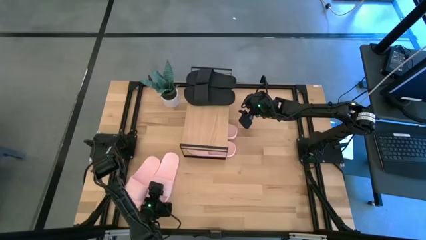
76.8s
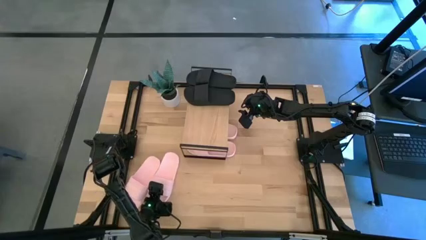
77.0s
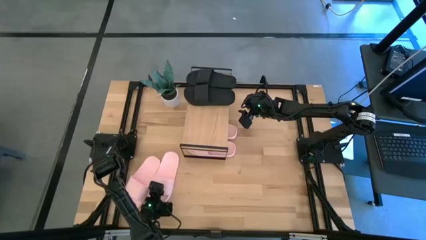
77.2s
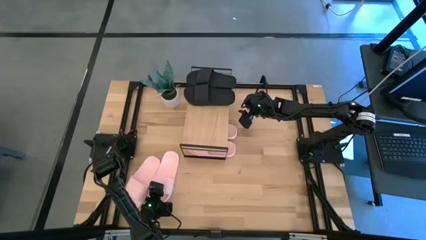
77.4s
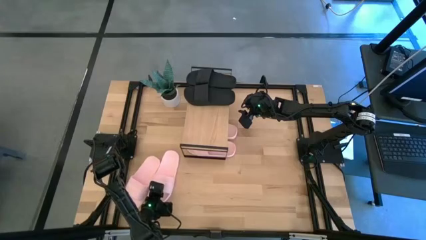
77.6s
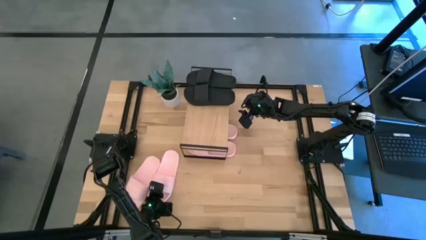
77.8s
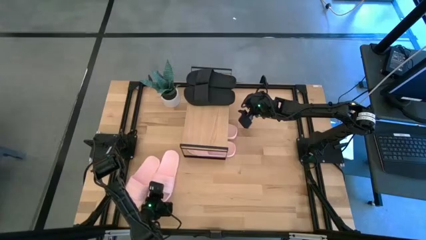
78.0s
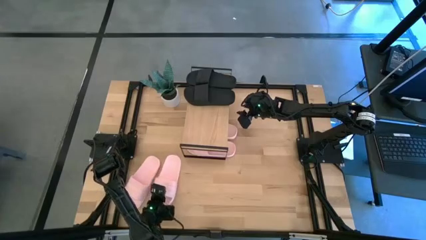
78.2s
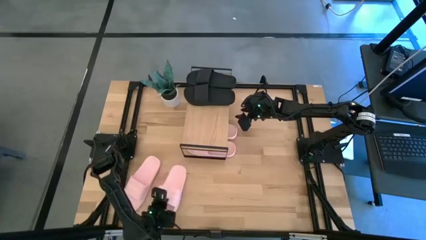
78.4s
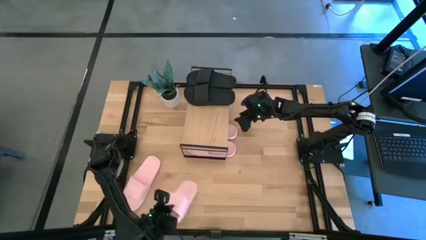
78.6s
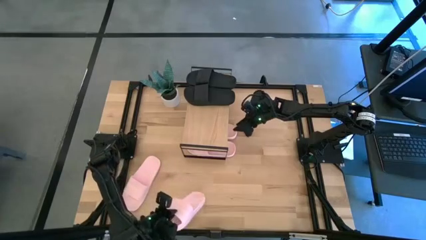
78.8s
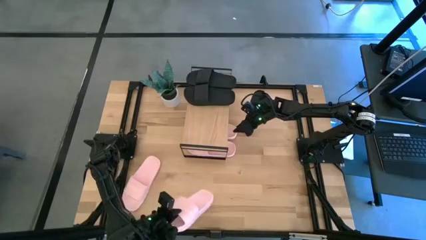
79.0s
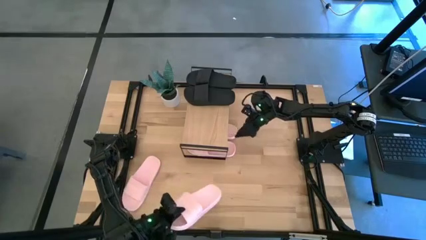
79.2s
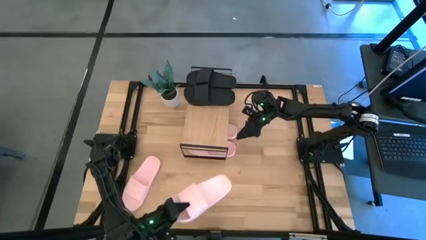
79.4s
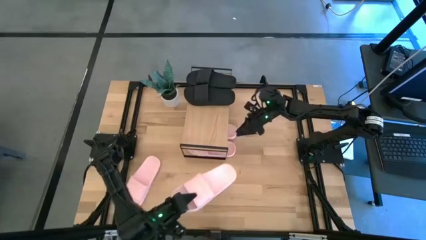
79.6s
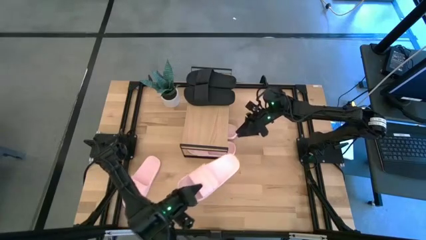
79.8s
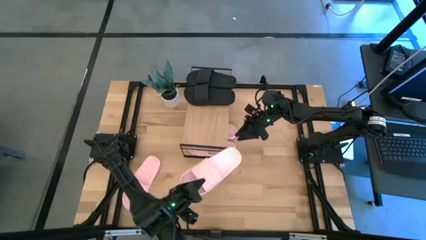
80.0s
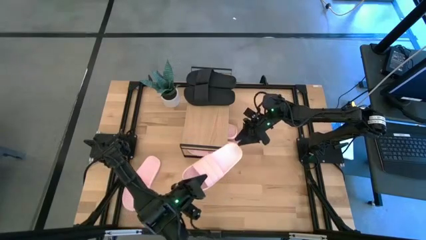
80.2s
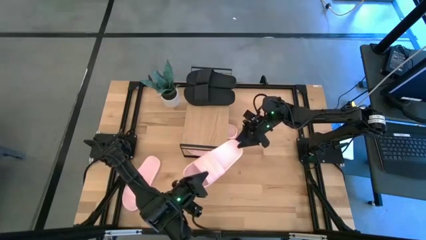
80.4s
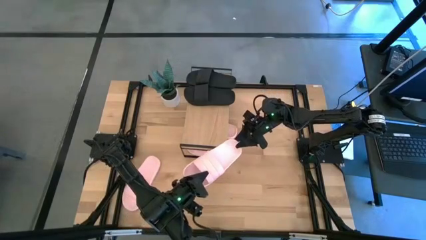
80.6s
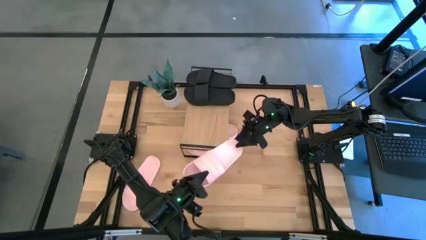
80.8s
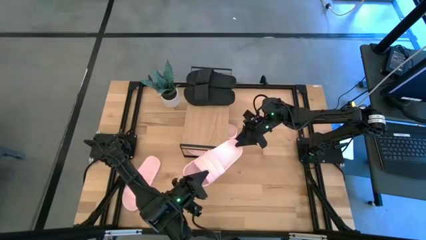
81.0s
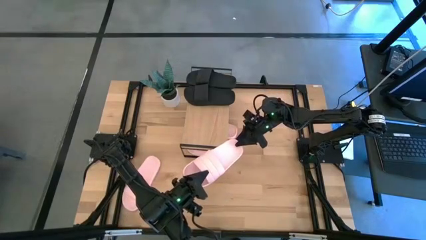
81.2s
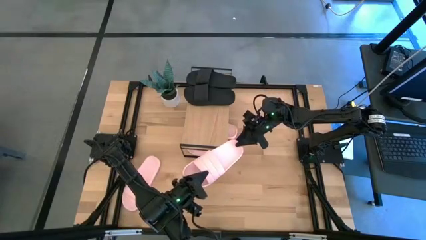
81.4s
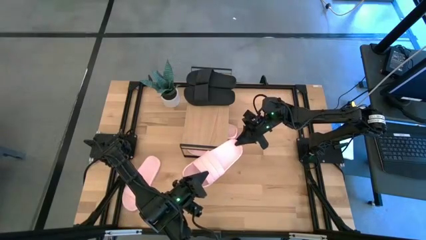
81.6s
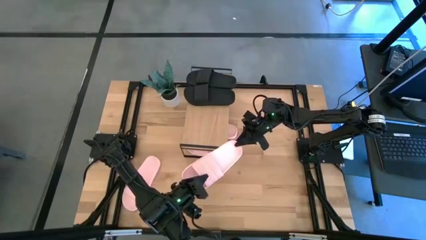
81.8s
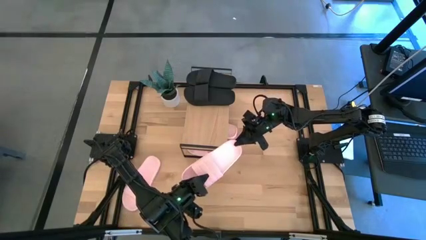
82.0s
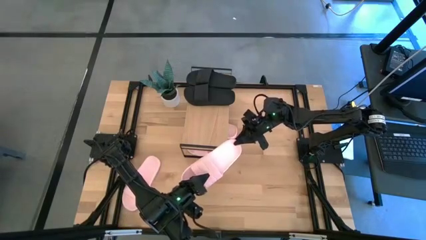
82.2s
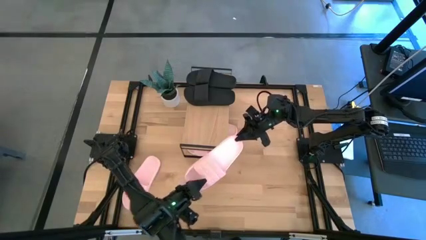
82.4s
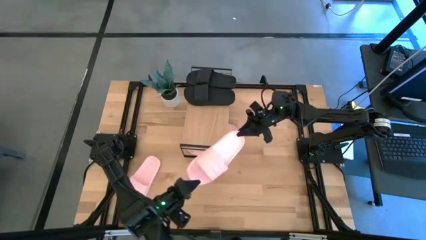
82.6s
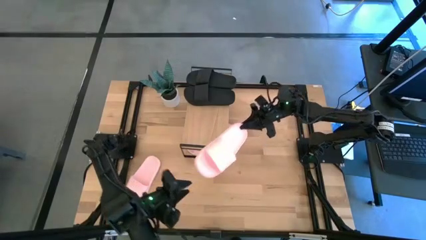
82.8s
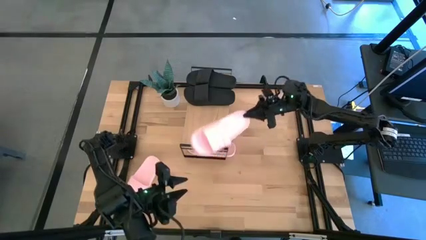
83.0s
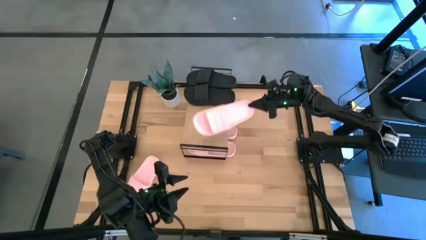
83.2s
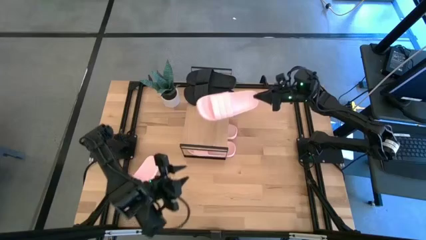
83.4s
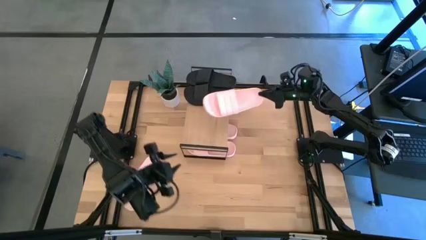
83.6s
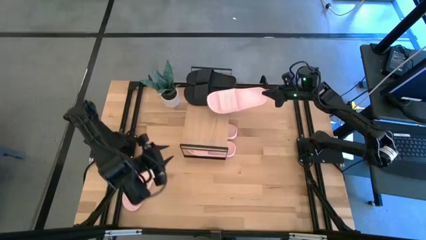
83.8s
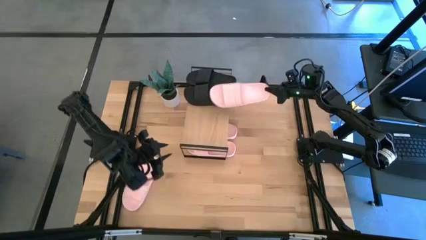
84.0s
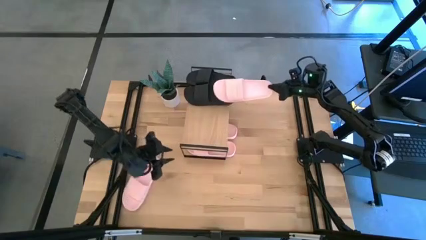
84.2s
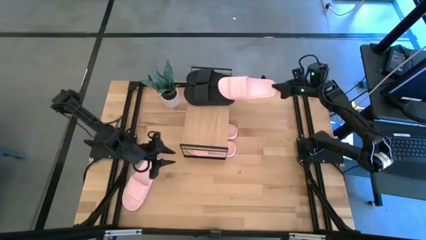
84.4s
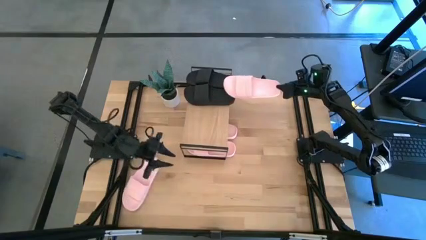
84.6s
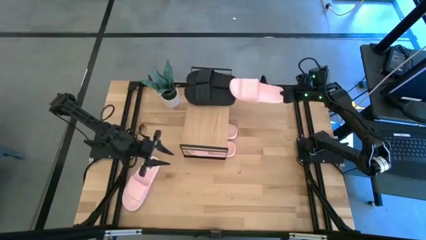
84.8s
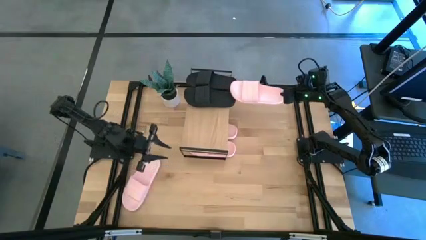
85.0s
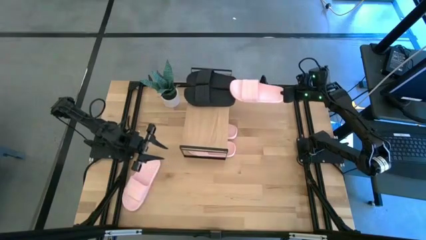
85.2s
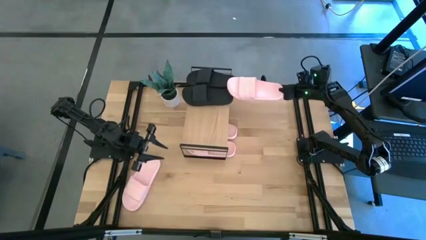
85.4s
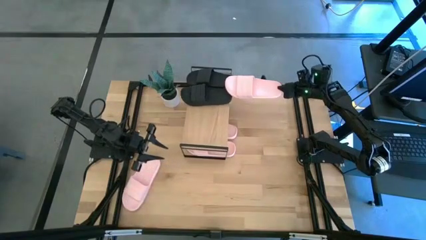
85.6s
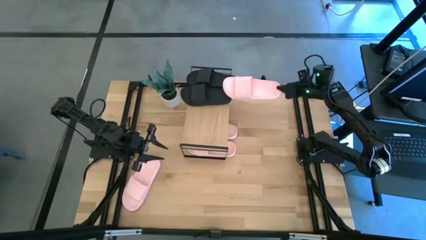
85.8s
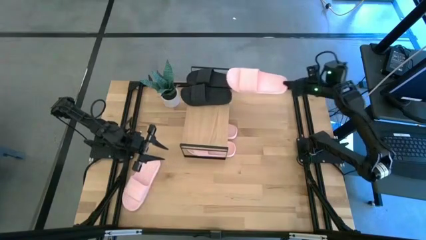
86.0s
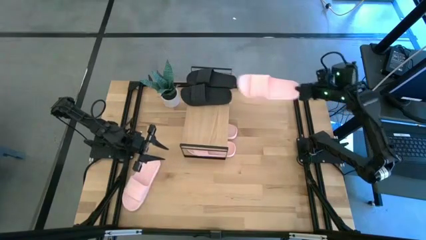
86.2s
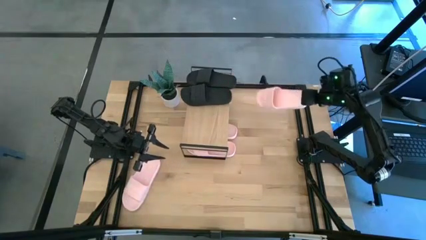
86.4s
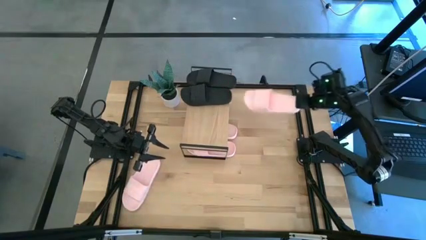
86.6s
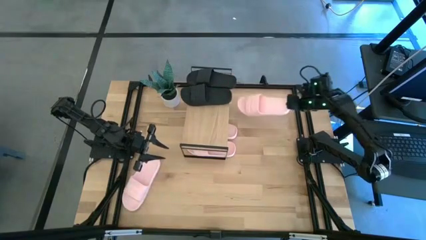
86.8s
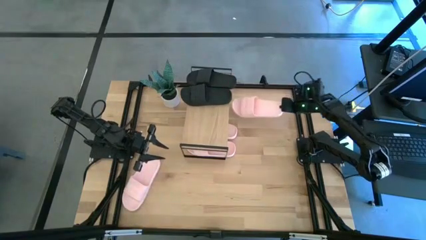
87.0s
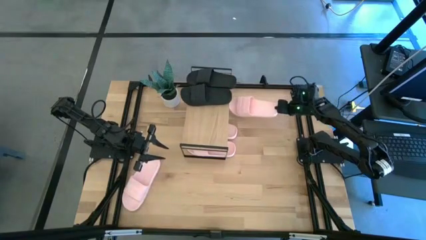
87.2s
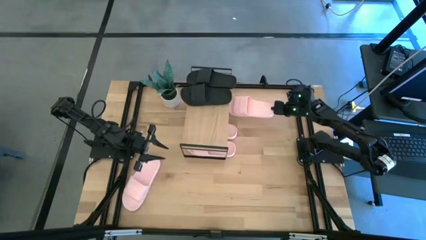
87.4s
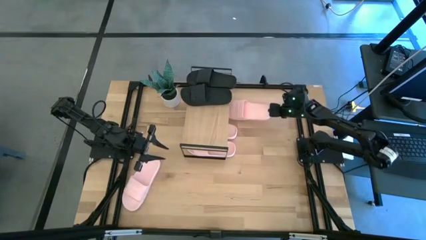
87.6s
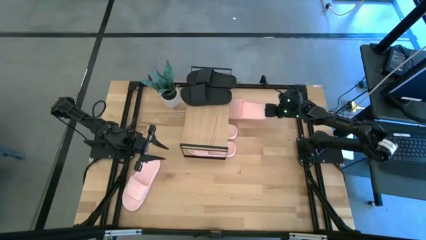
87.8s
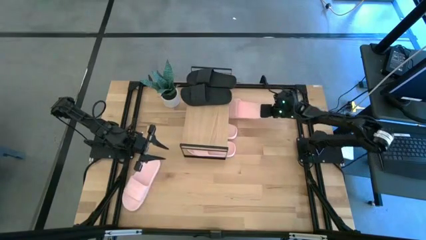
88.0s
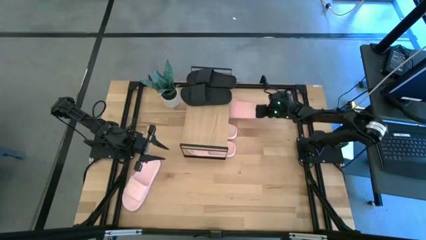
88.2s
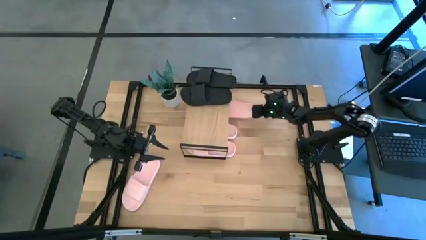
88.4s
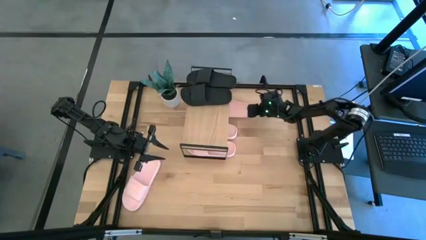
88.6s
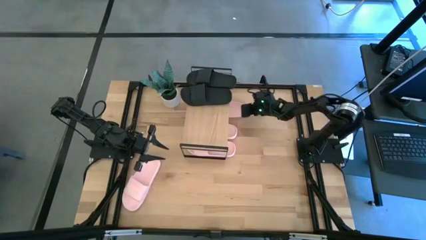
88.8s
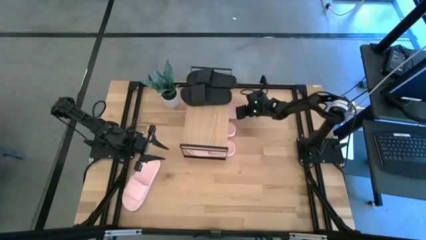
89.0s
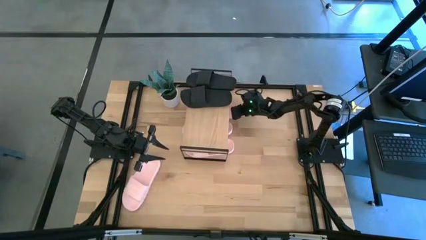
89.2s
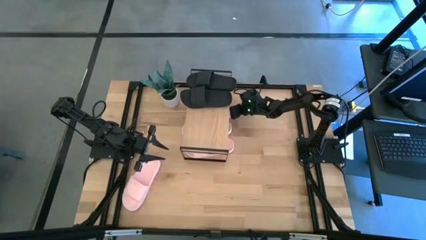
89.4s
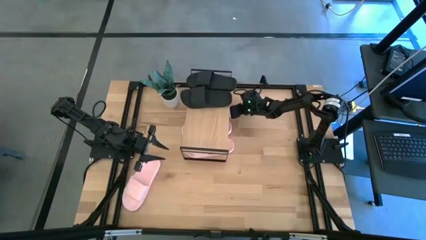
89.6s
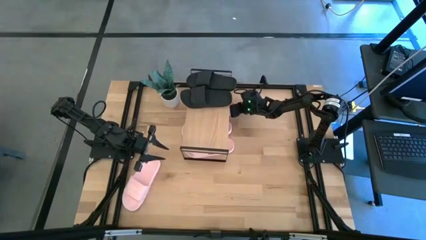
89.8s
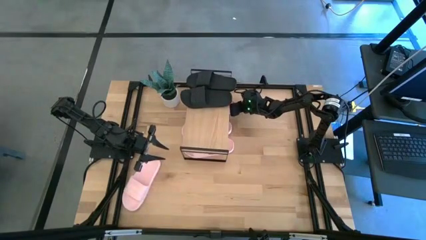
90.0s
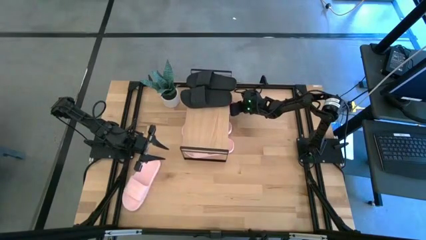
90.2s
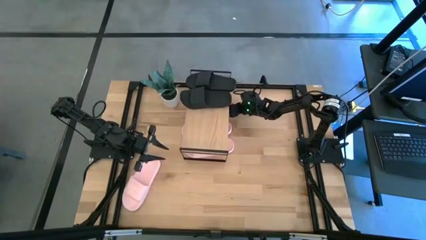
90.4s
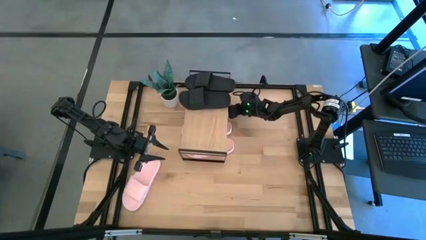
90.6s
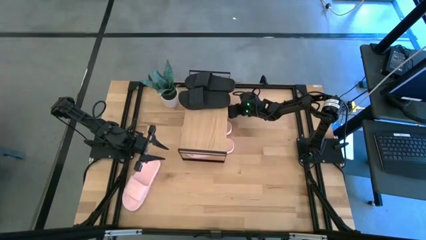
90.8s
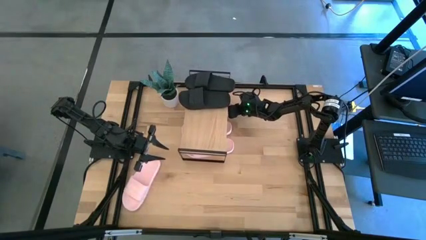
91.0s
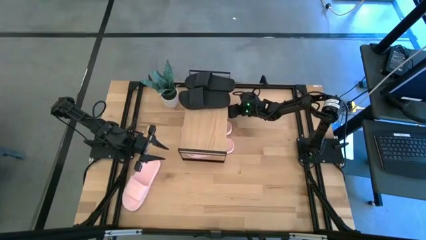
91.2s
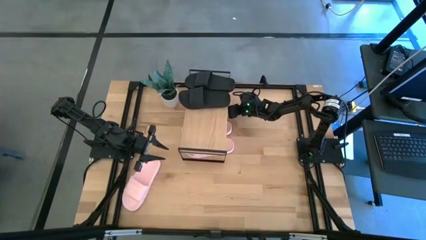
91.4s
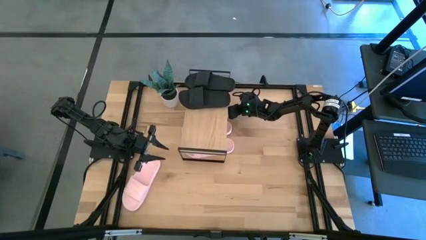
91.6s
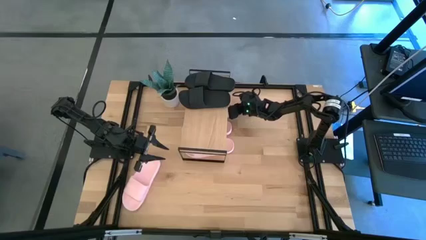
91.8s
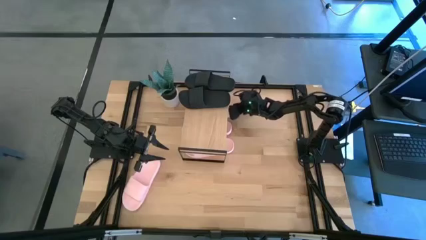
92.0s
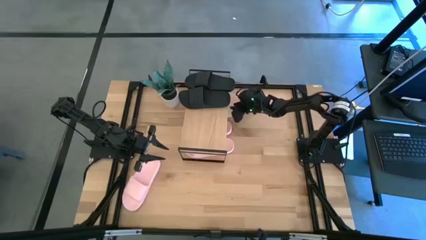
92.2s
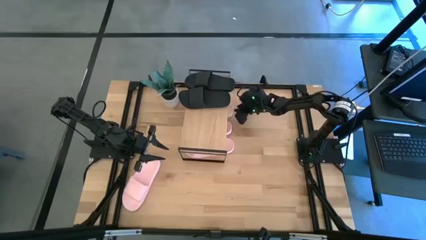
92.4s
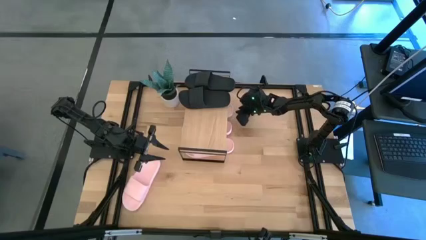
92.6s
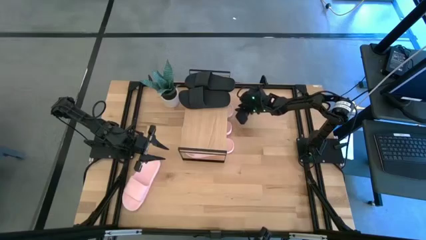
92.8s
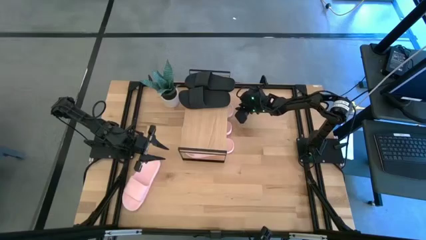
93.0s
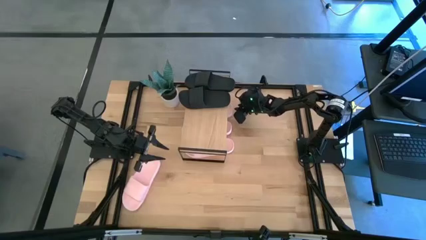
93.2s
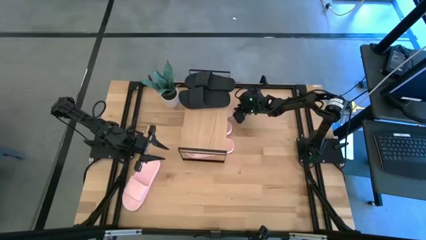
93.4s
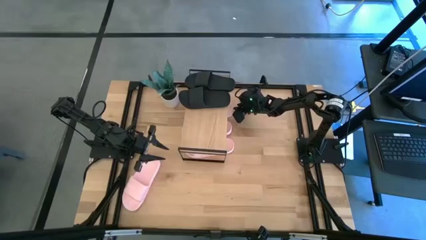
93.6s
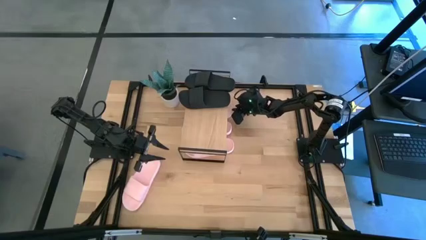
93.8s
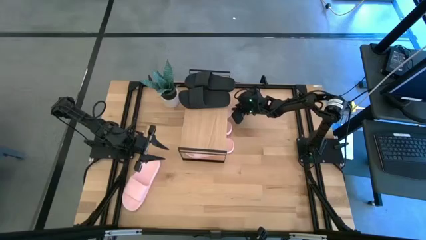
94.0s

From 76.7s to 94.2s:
Task: Pick and place slides into the shelf
Put the pink slide under the shelf
